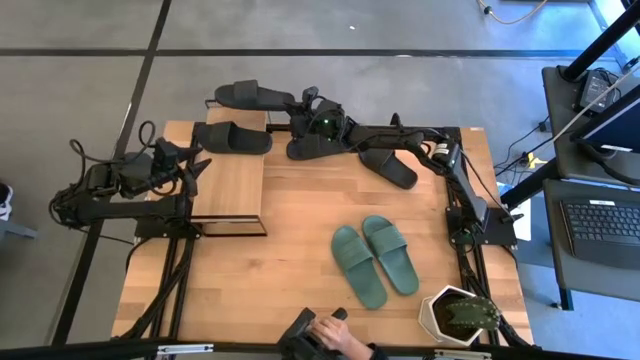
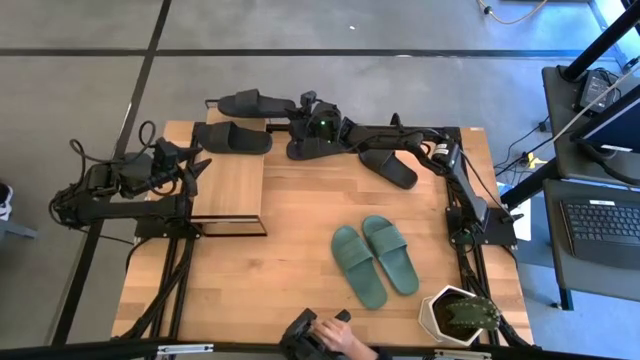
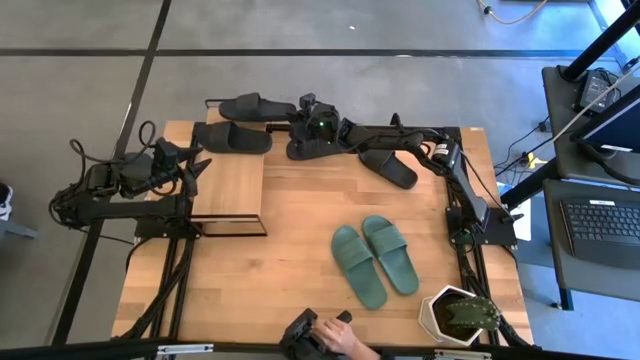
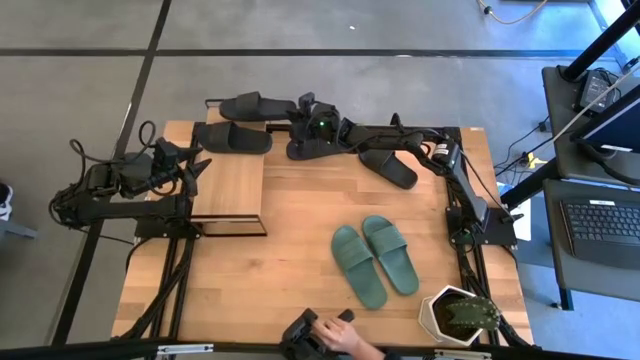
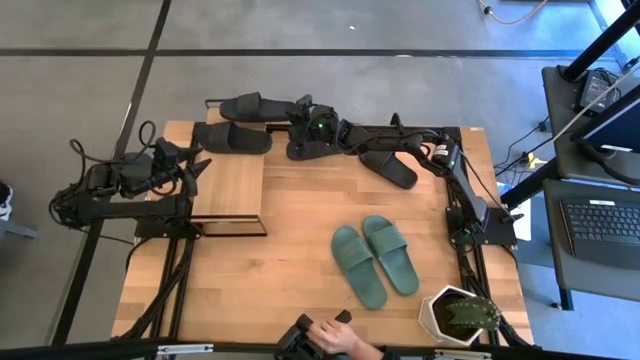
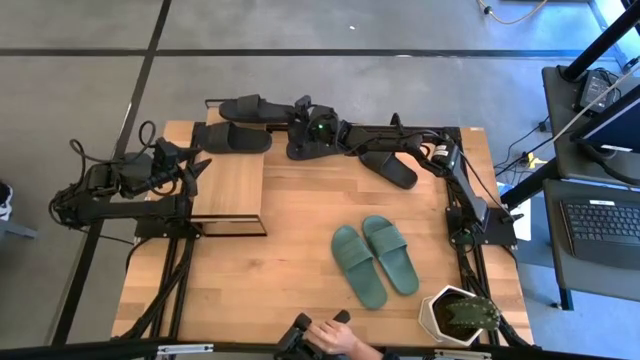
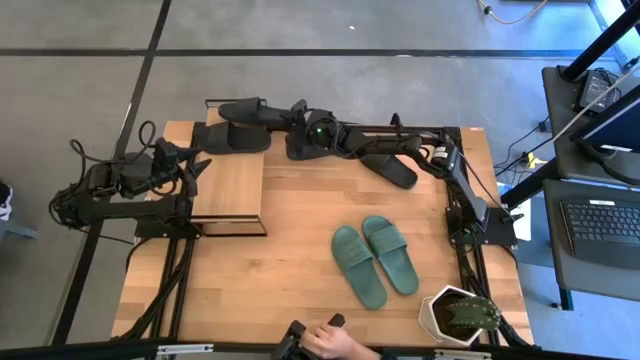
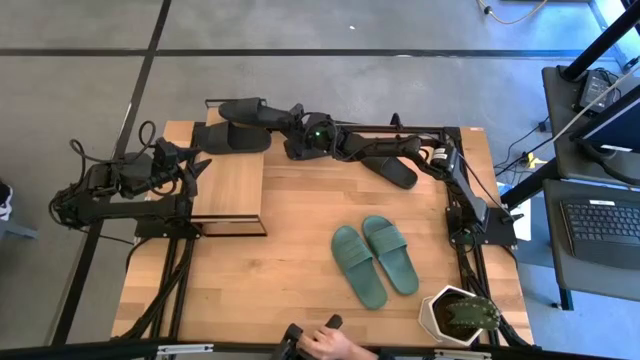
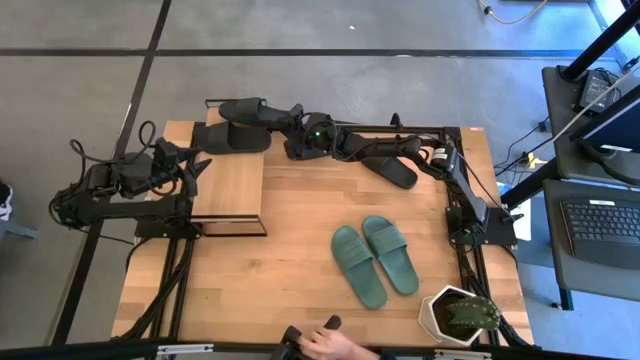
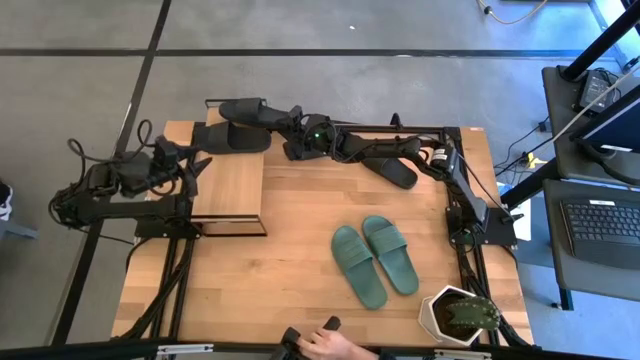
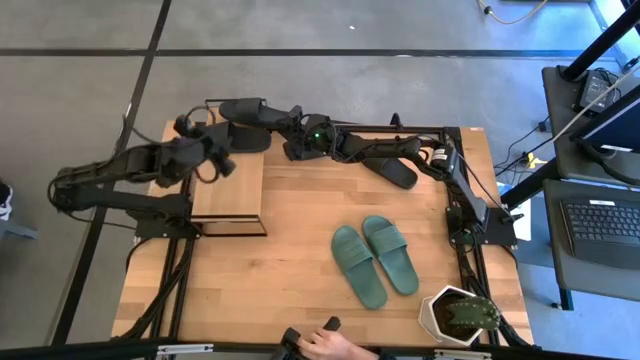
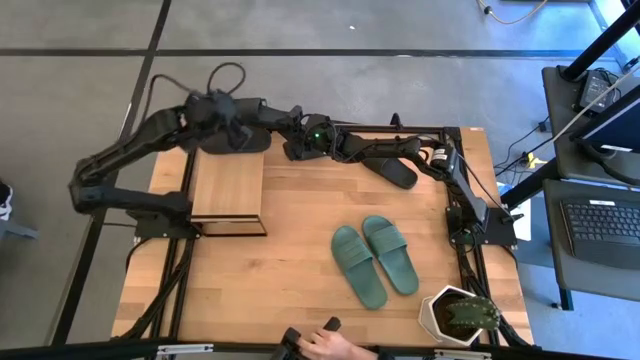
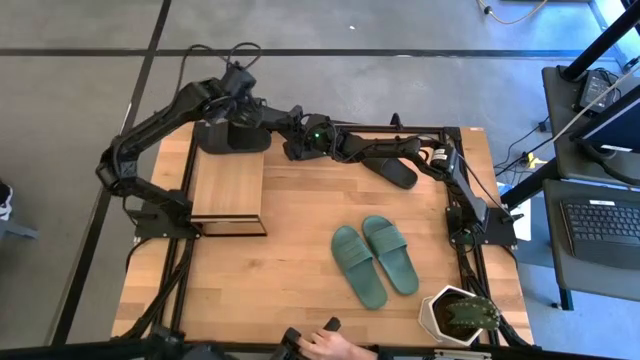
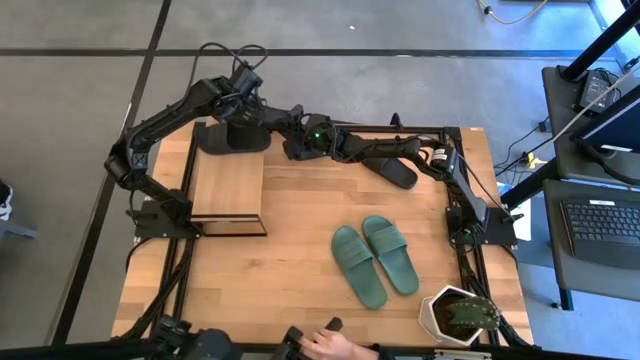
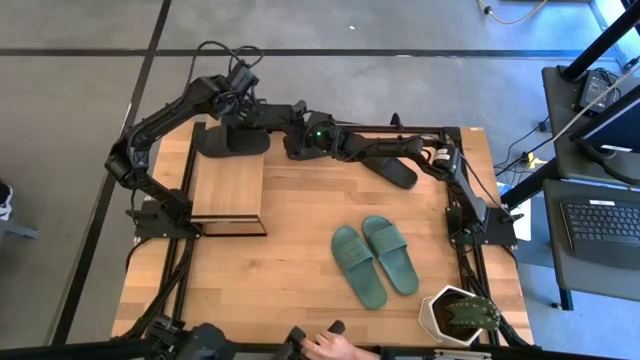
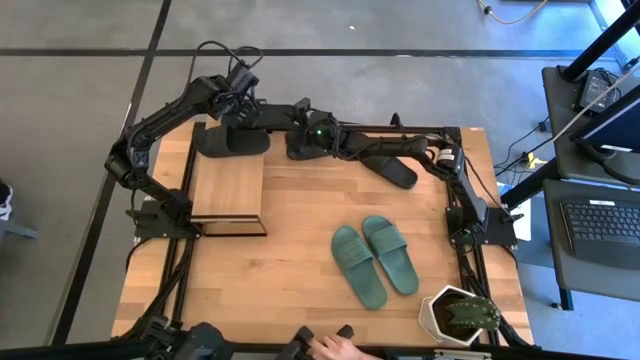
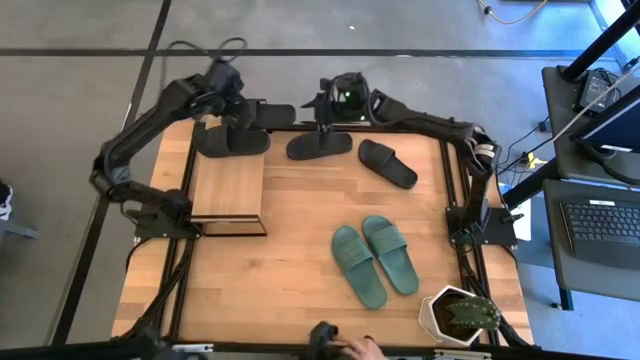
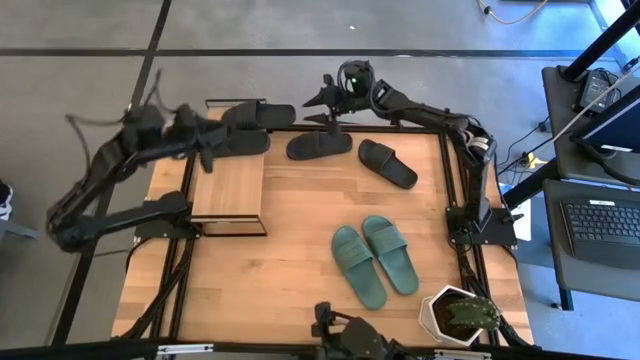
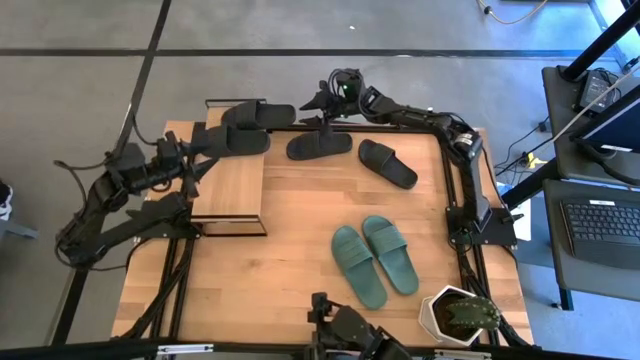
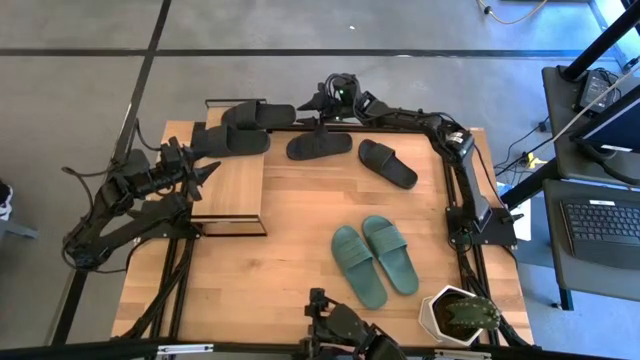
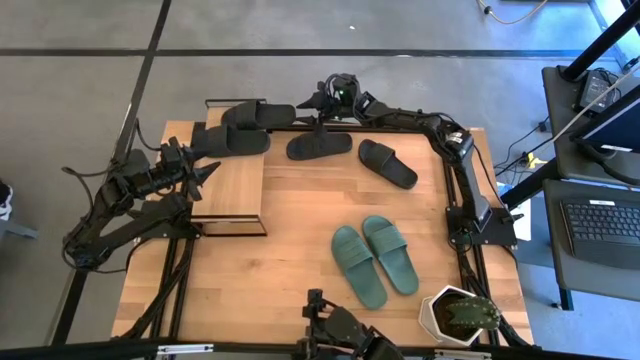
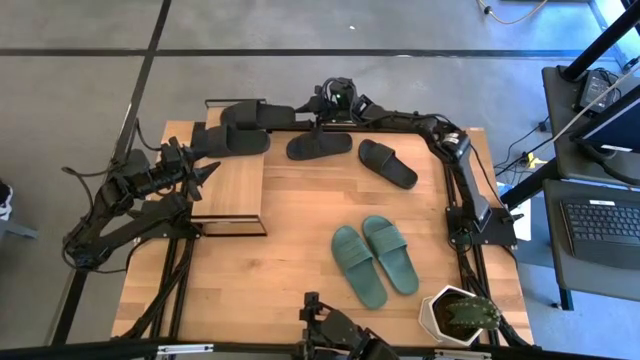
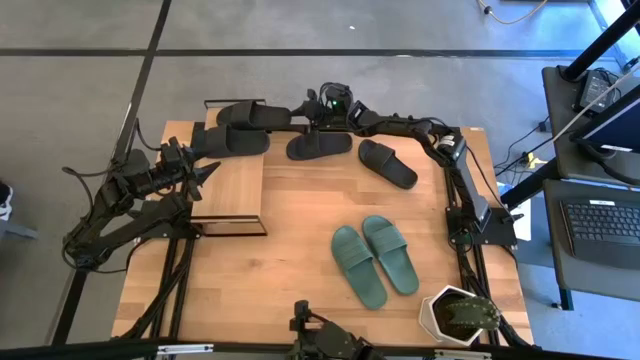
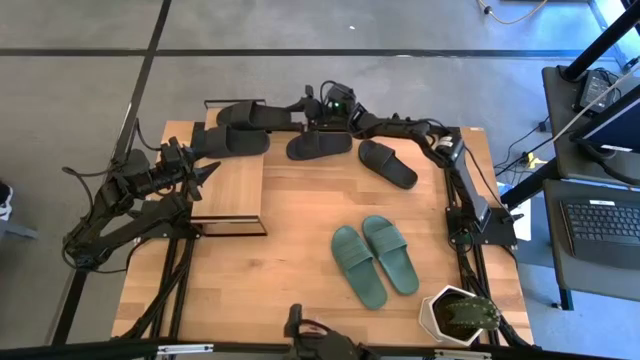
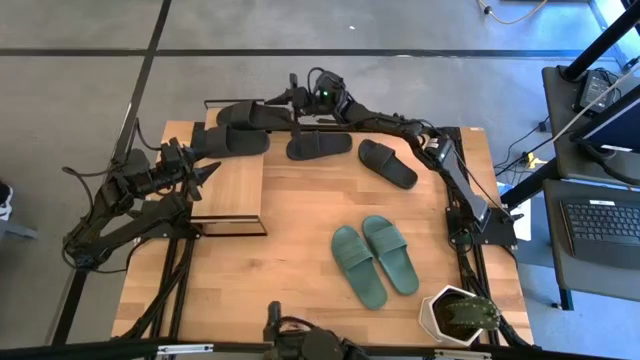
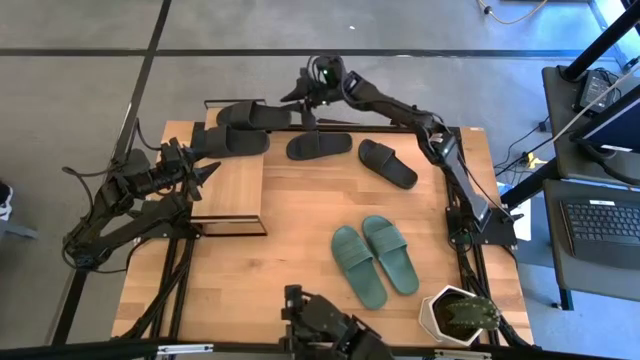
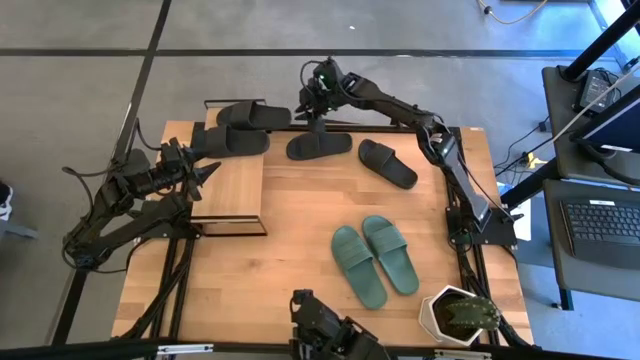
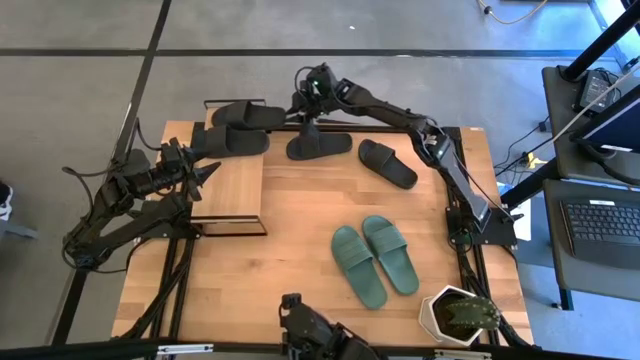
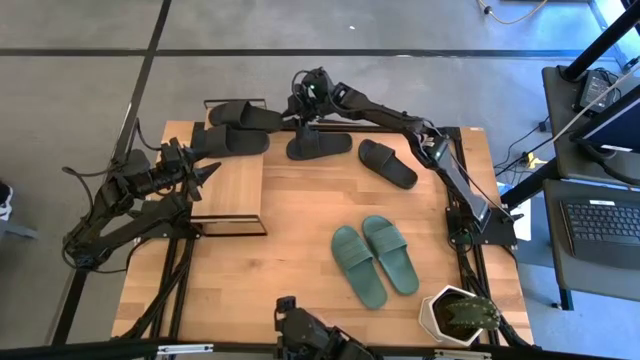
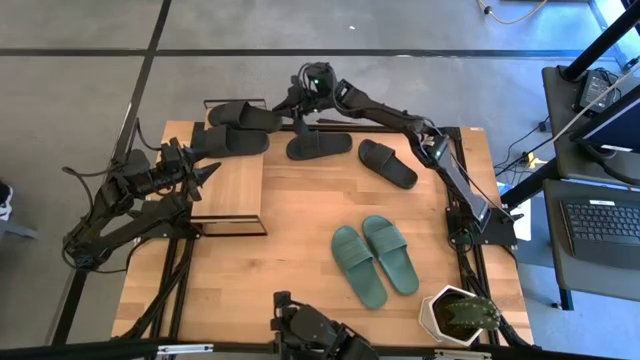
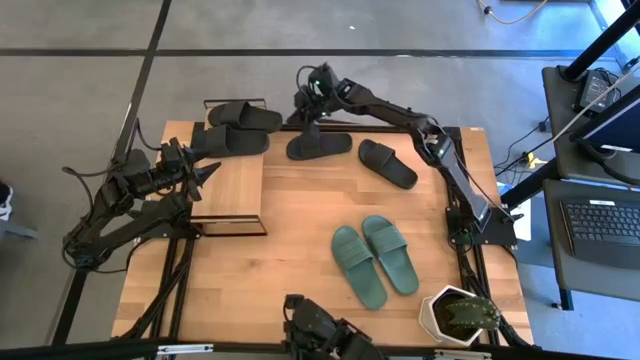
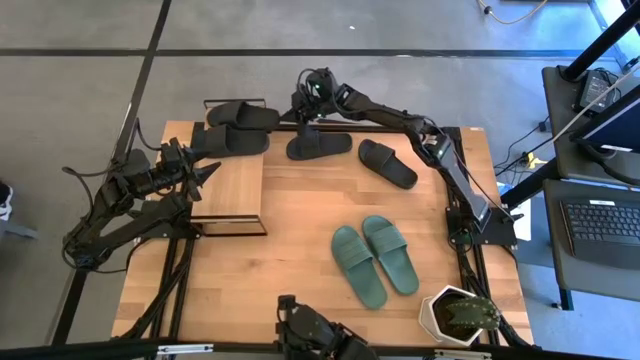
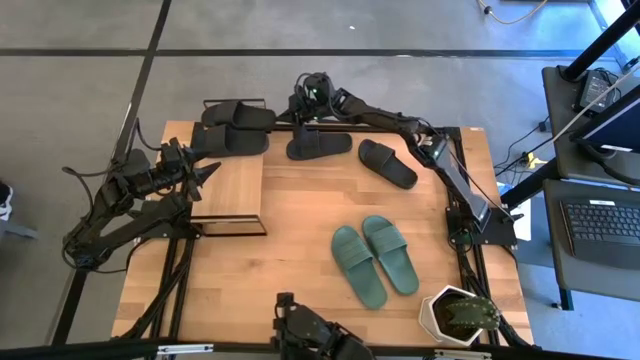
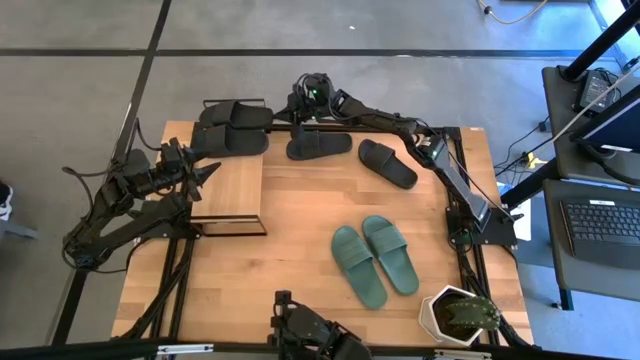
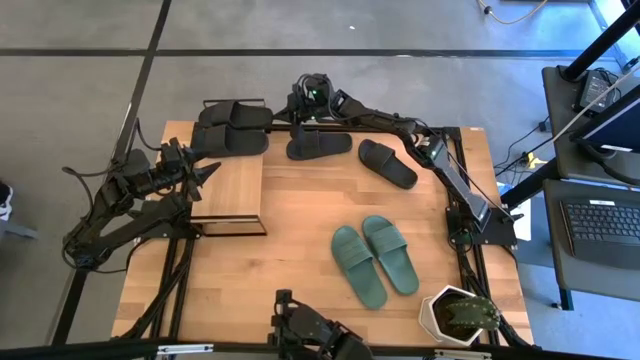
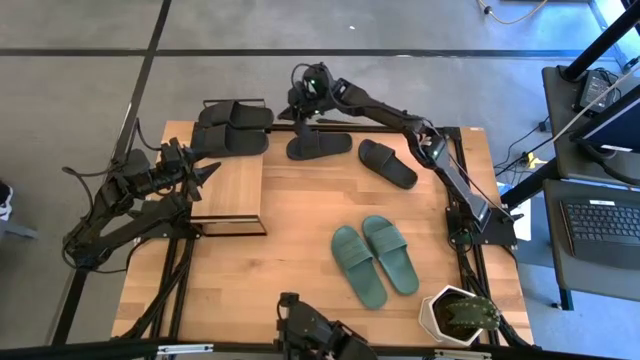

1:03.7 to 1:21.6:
Task: Pick and place slides into the shelf
Put the black slipper on the shelf
